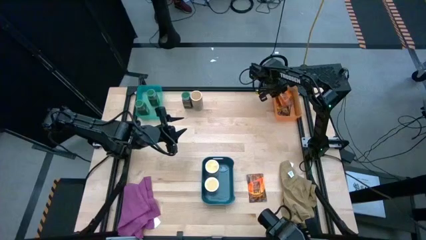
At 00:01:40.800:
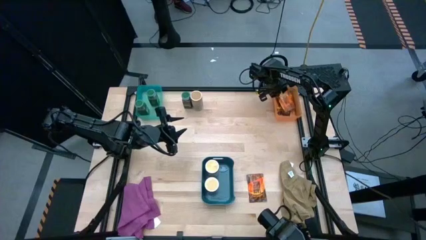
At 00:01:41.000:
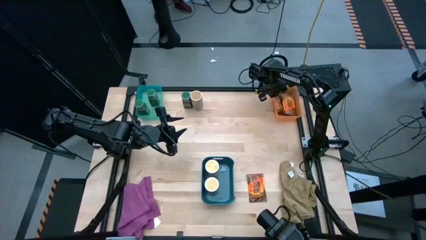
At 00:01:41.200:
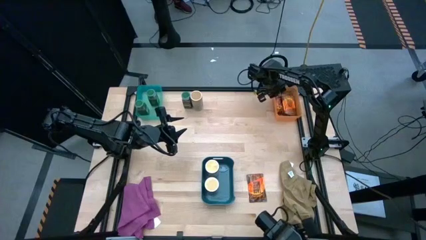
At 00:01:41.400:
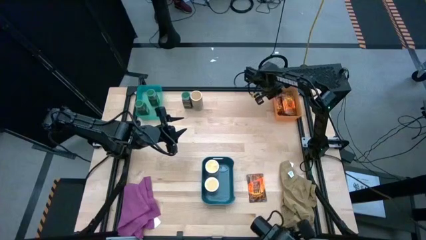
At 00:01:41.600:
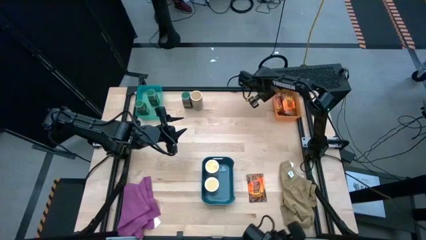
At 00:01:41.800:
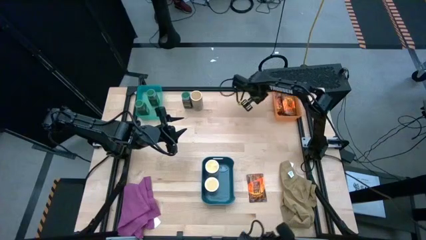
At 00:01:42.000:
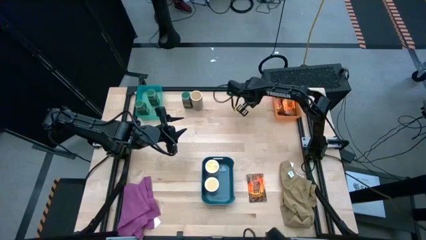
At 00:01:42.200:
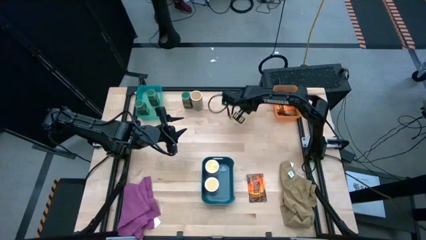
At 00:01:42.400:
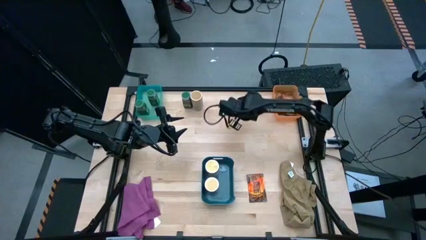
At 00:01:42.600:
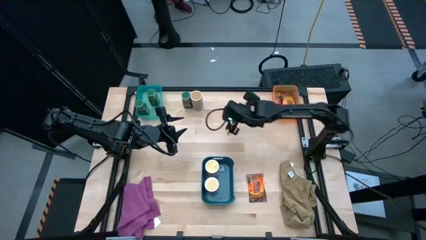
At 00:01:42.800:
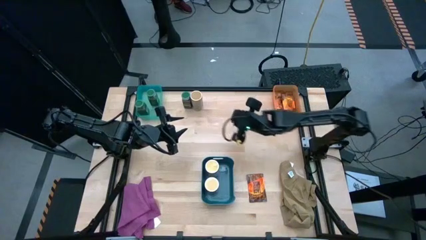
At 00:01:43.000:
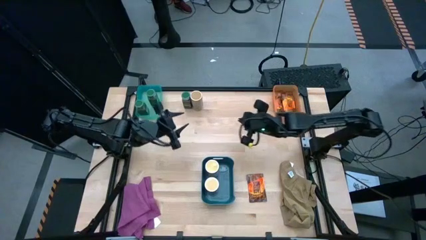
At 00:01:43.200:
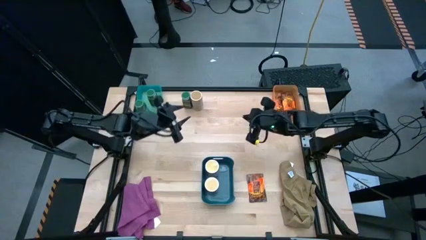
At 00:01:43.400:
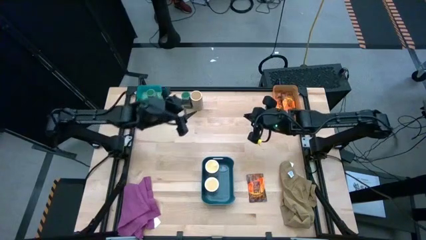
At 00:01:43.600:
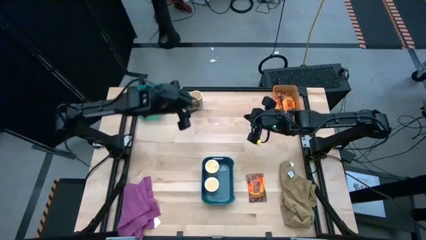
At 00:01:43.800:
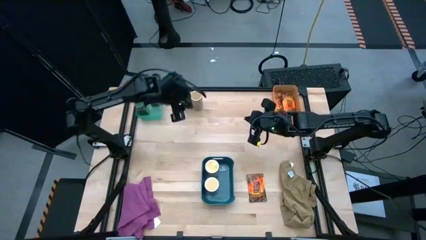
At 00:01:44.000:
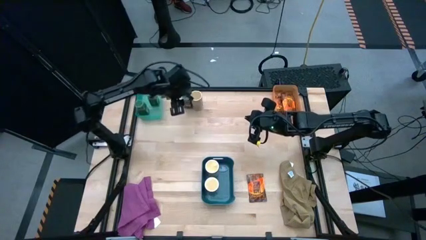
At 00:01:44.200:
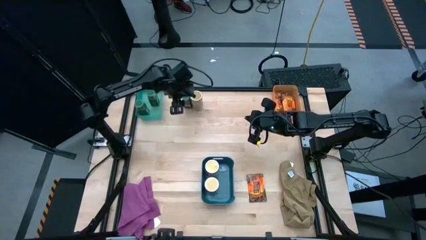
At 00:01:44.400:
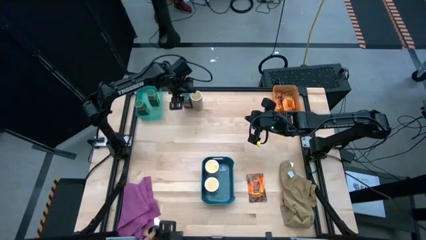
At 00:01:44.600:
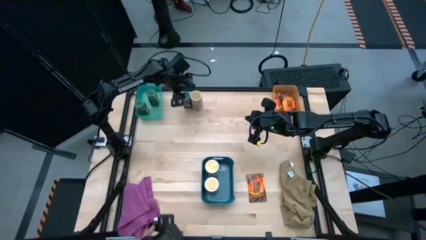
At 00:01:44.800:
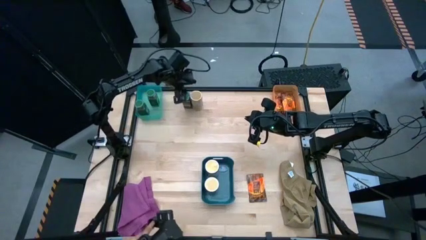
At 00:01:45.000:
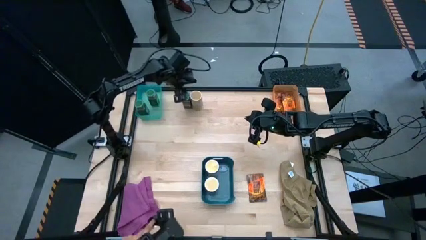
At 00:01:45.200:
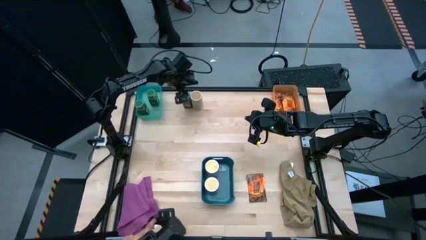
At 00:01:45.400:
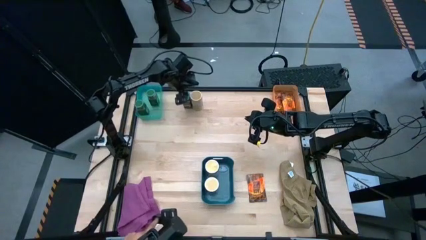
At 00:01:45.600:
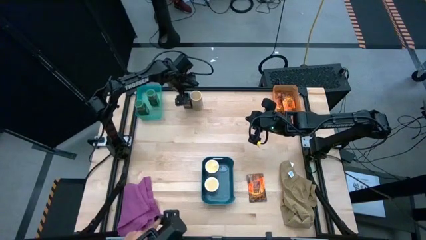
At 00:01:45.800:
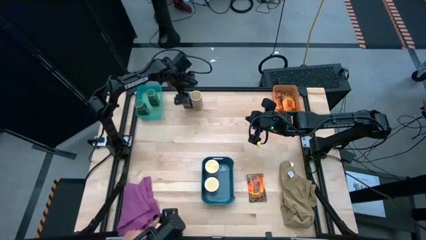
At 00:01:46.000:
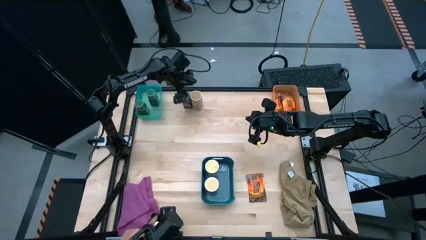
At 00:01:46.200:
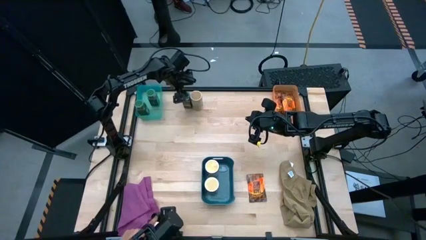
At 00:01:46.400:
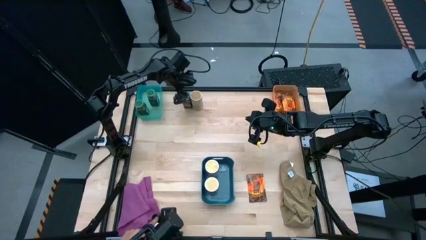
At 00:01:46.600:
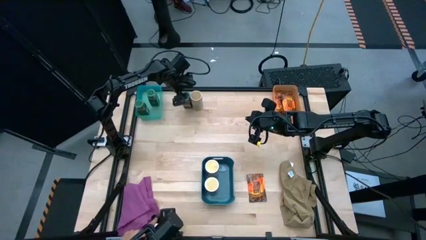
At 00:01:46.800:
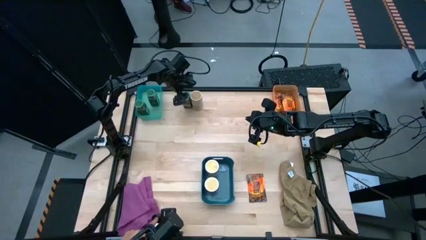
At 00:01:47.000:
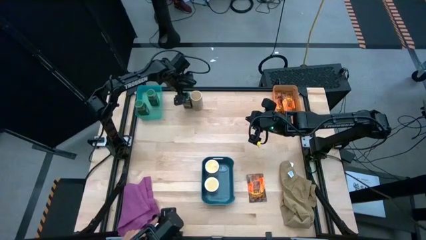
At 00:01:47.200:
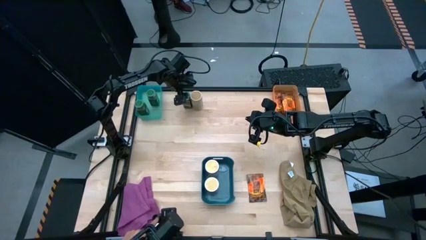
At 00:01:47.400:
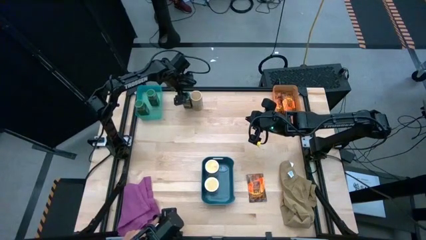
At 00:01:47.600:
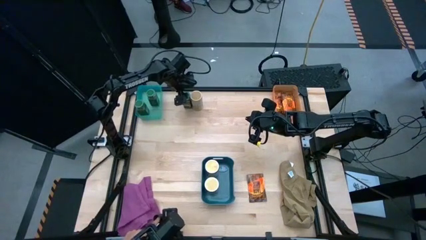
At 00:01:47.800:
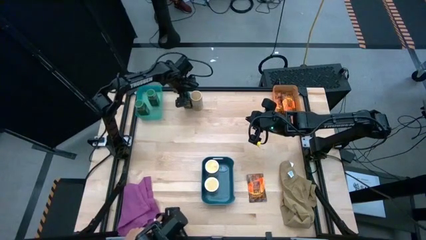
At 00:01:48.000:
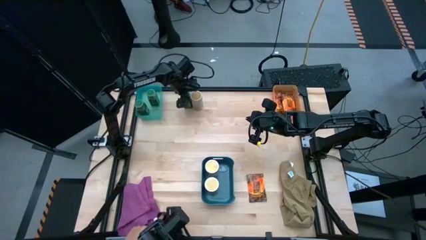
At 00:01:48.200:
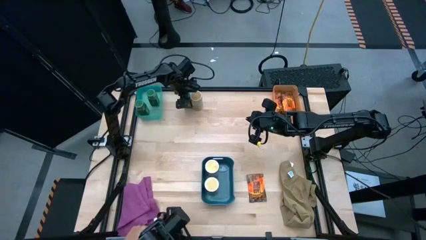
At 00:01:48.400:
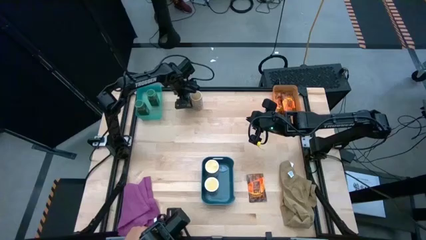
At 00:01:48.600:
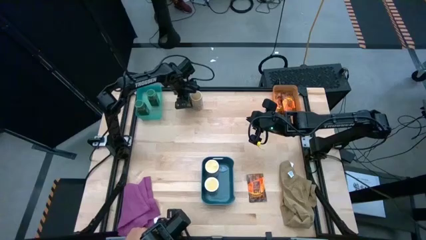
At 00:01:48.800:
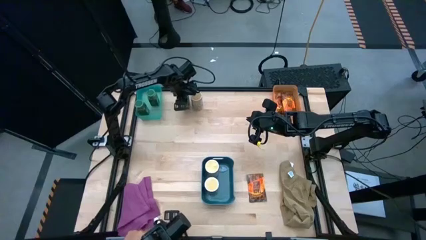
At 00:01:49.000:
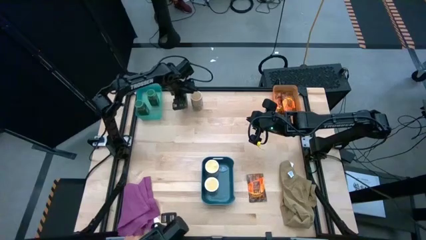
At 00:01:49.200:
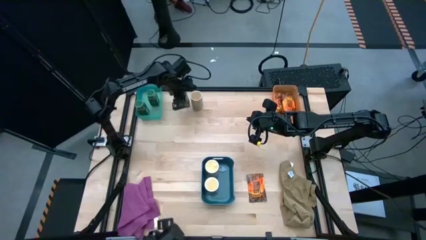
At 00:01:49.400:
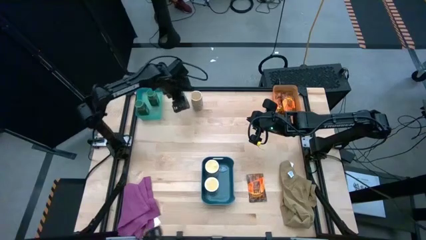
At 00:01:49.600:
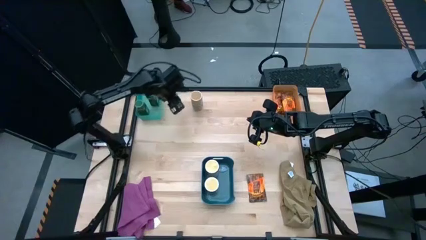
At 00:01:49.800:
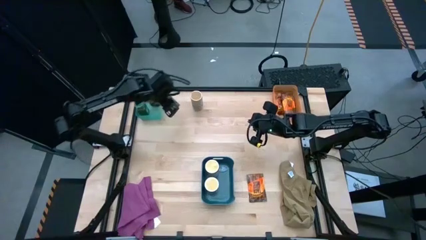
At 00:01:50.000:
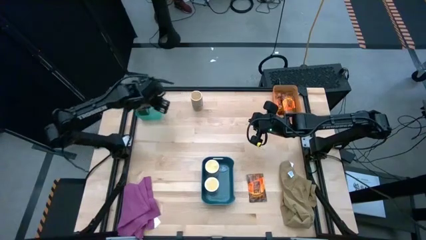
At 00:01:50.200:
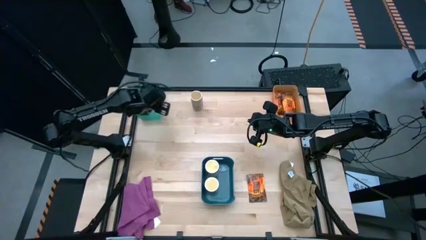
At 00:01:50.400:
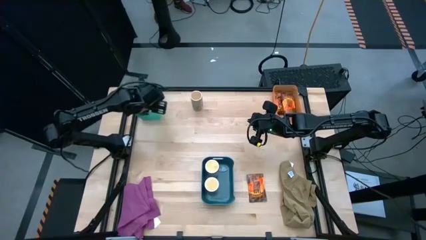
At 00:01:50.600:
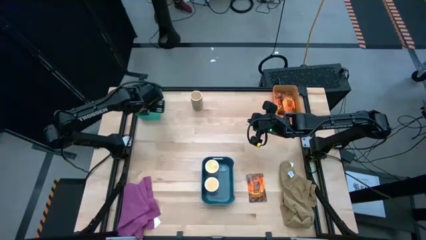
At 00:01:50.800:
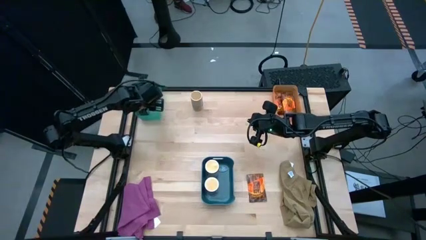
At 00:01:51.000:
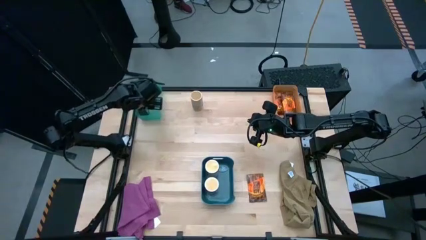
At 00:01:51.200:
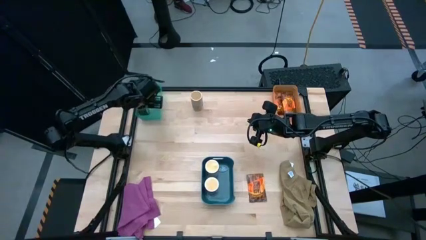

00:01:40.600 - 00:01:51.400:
Task: Sort spices by type
Put the green seasoning bottle into the light blue bin
